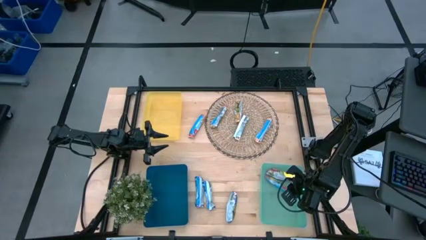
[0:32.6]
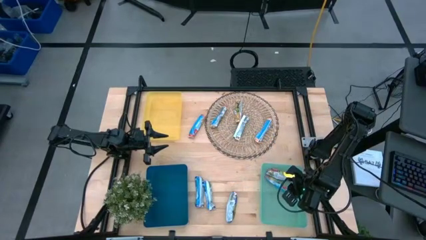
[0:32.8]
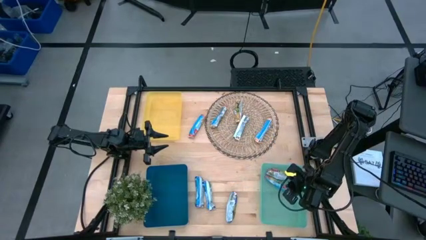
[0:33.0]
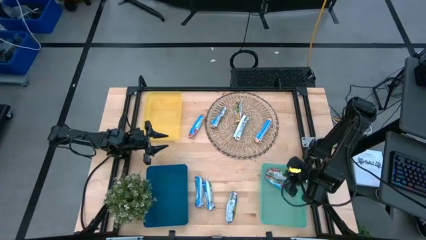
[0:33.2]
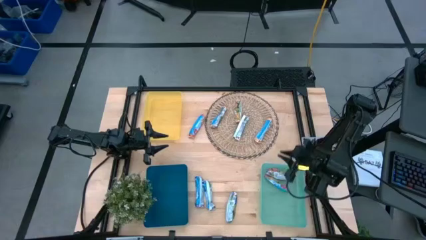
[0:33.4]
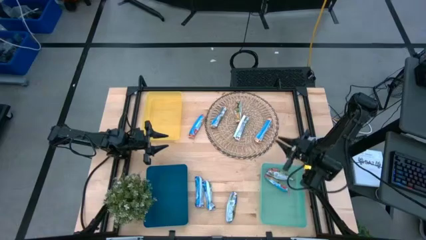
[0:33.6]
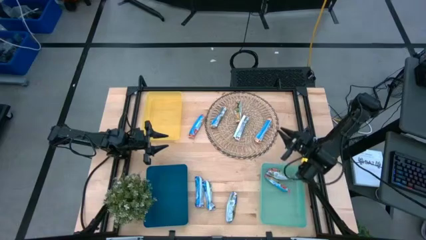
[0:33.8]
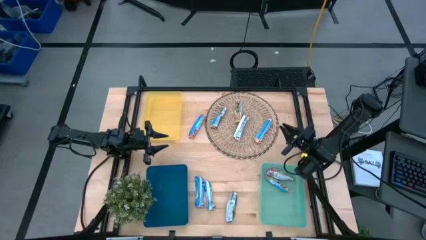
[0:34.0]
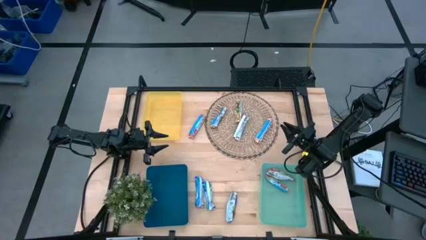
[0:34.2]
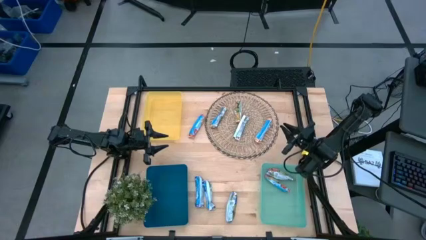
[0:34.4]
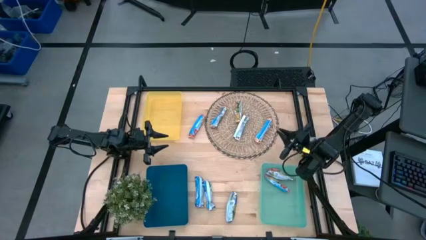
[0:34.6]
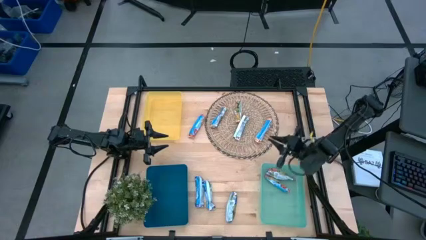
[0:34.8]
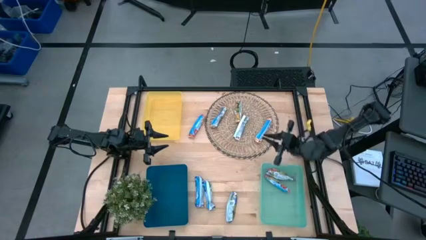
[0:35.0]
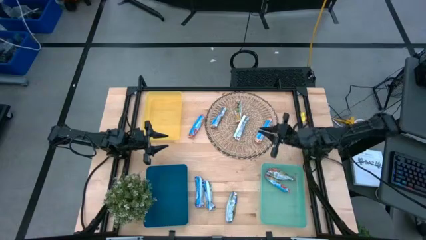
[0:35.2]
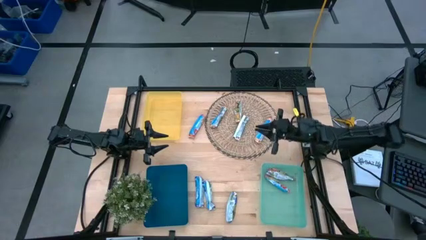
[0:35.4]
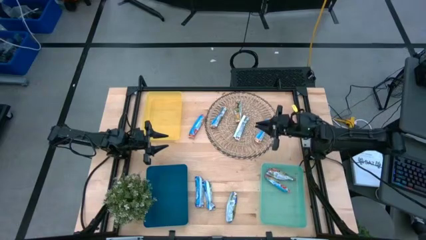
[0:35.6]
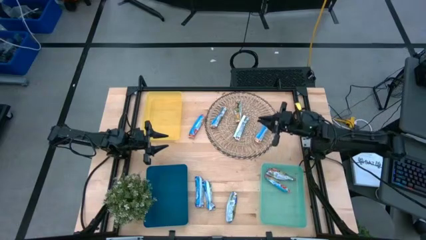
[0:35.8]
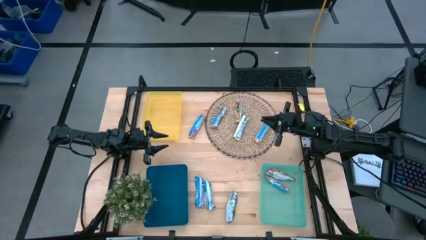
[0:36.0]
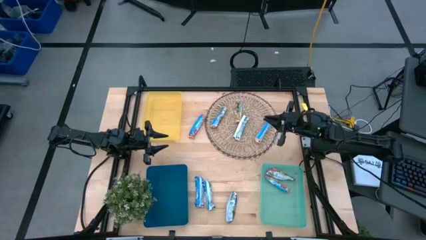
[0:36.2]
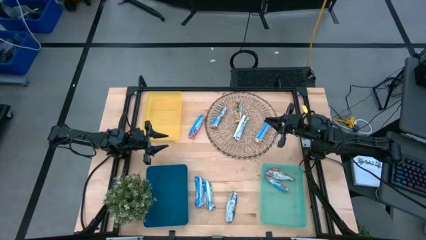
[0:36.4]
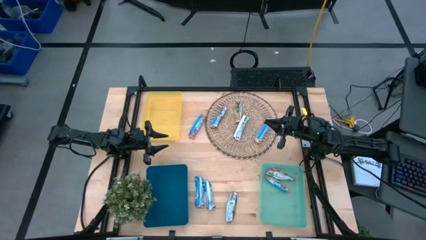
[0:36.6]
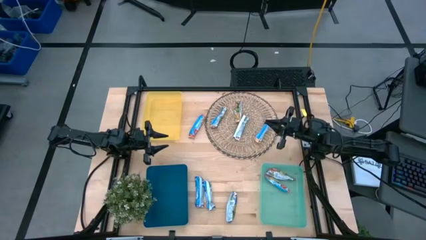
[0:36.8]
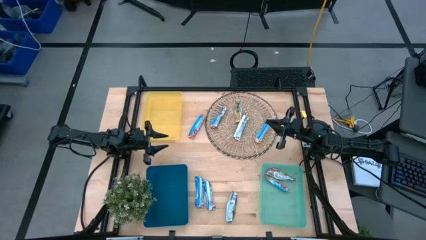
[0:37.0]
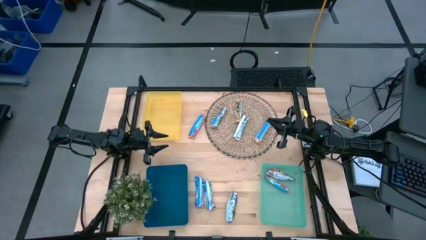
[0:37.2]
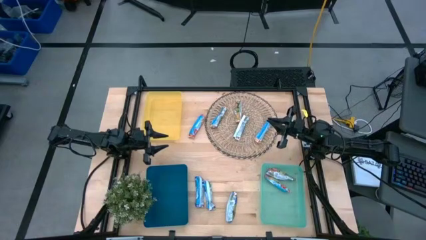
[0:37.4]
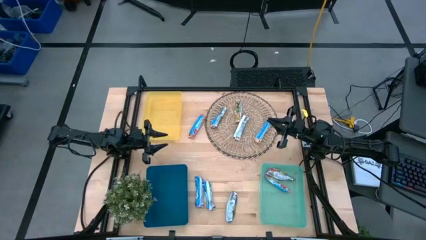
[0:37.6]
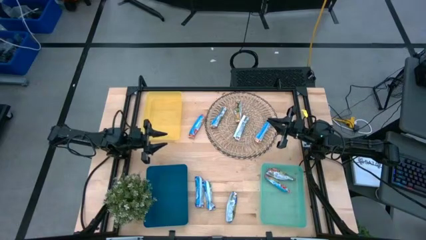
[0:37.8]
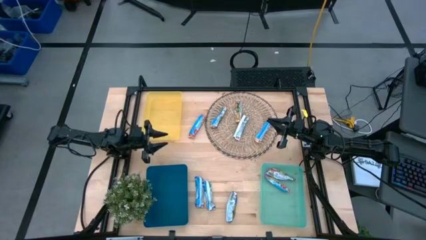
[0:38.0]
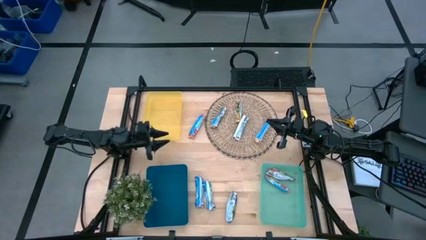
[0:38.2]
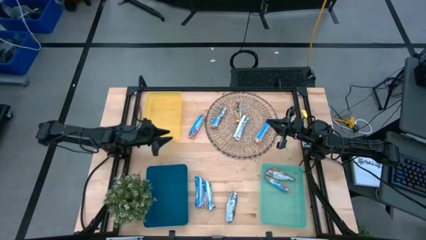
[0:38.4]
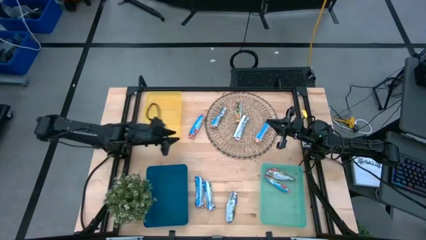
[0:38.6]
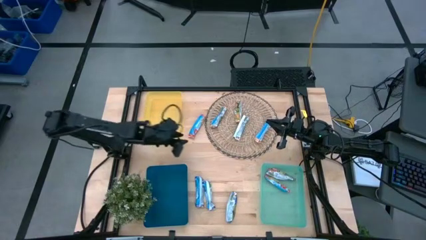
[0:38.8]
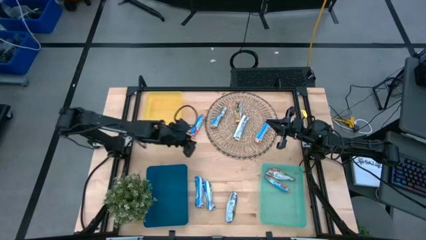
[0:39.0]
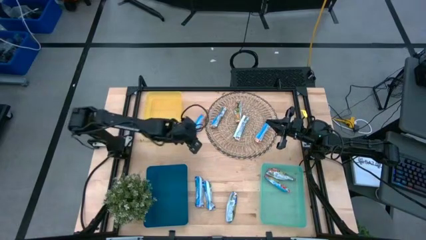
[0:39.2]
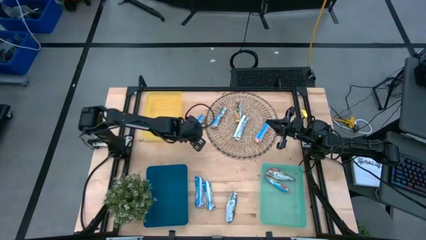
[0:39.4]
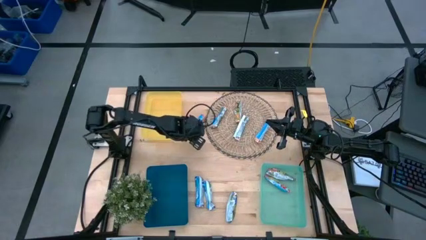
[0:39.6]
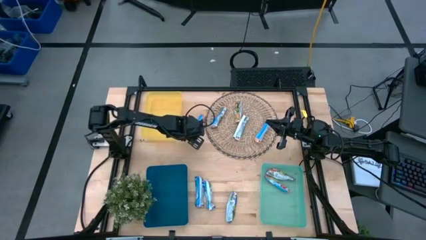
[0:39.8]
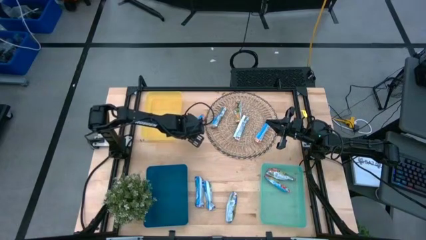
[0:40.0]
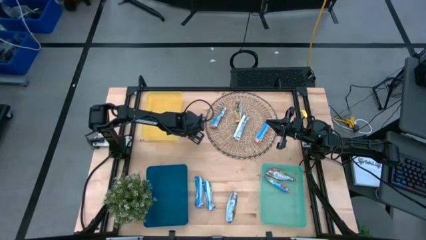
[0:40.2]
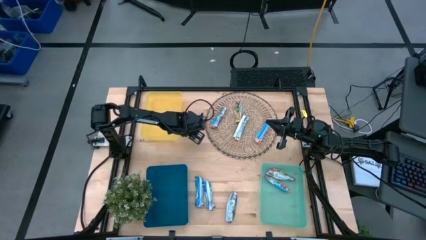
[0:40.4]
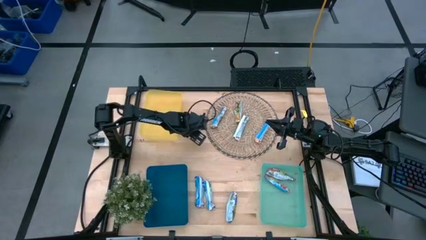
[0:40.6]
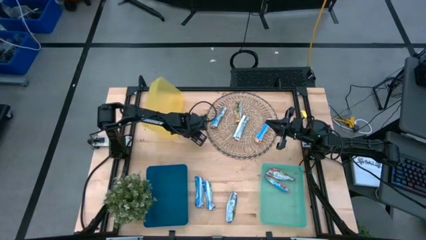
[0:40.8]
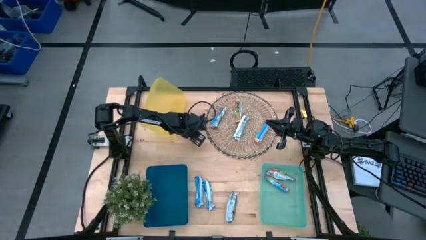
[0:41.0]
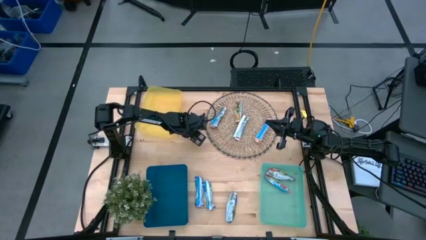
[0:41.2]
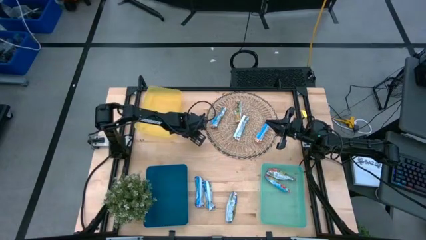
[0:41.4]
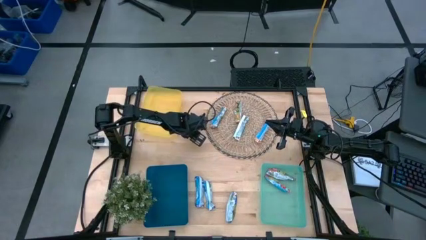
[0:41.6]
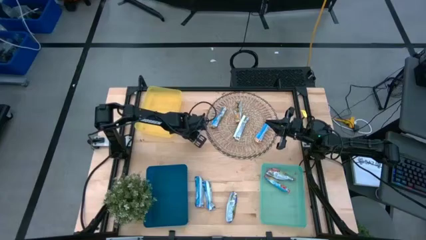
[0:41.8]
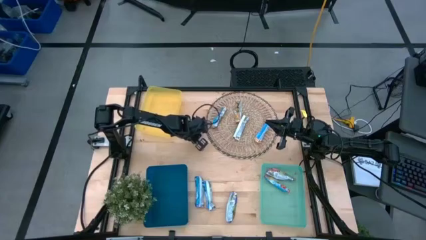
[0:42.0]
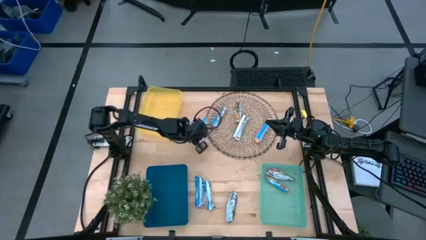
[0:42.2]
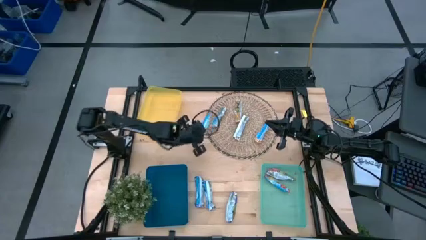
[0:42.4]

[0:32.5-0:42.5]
Task: Pick and place Granola Bars by type
Put the red granola bar into the light blue bin
